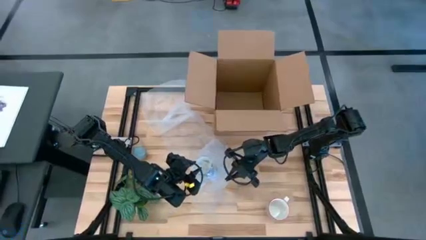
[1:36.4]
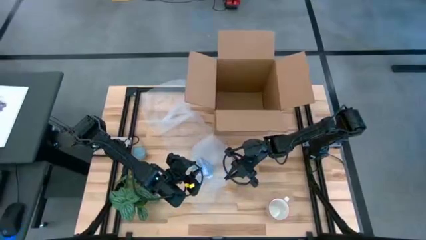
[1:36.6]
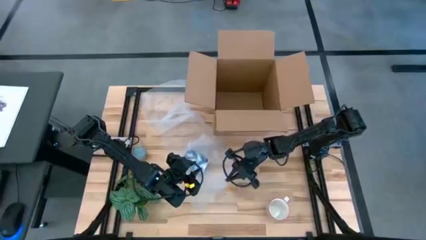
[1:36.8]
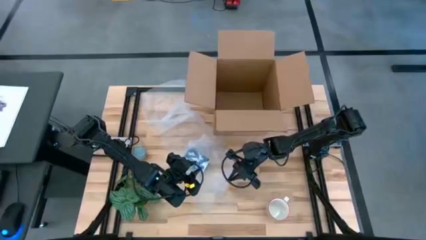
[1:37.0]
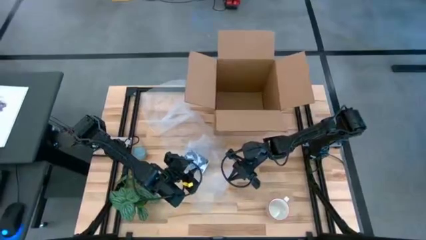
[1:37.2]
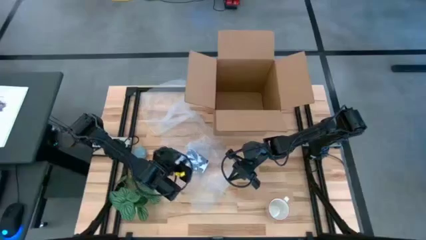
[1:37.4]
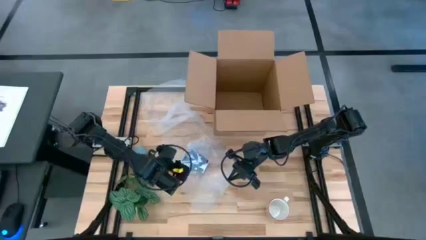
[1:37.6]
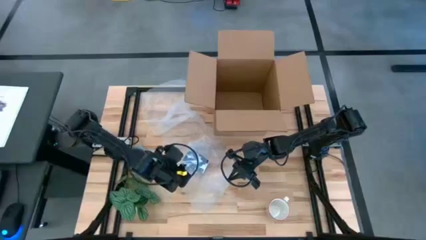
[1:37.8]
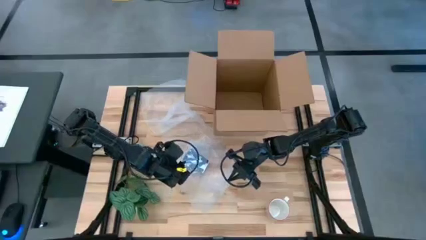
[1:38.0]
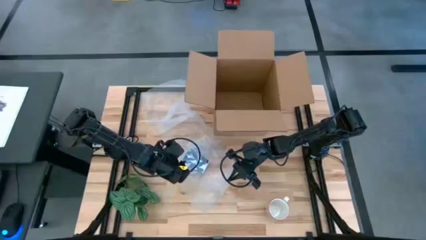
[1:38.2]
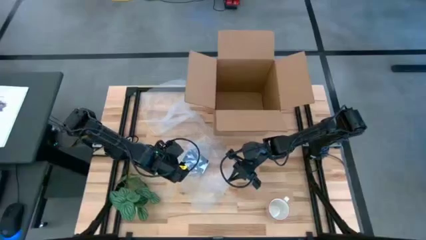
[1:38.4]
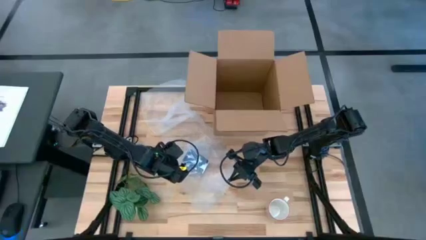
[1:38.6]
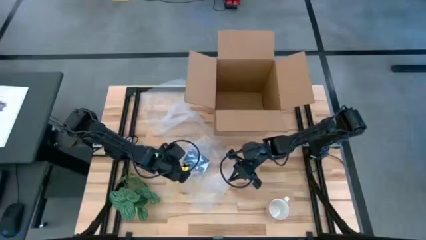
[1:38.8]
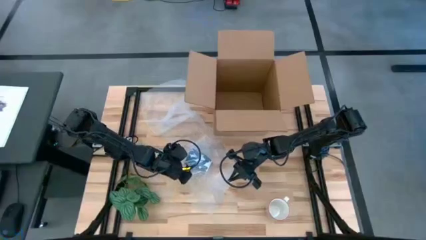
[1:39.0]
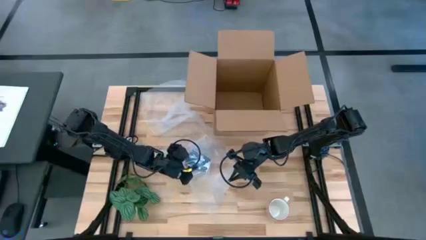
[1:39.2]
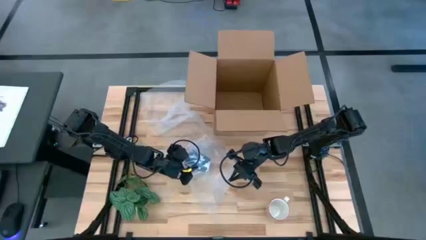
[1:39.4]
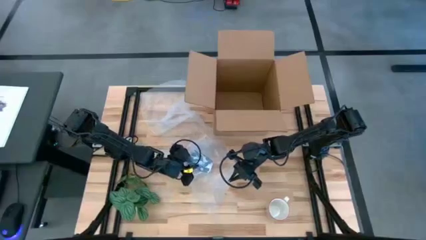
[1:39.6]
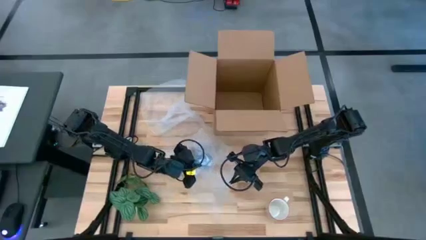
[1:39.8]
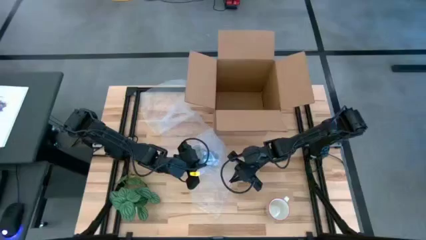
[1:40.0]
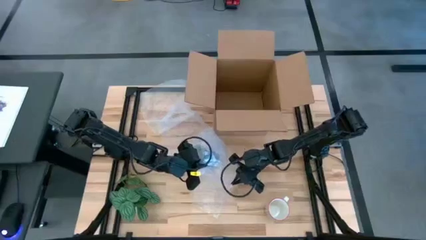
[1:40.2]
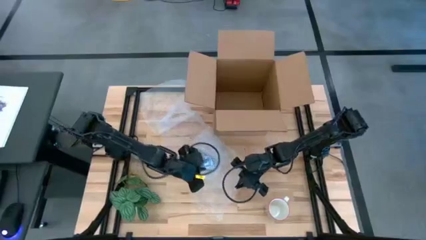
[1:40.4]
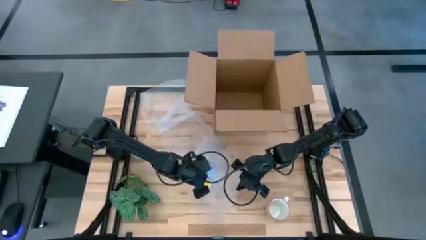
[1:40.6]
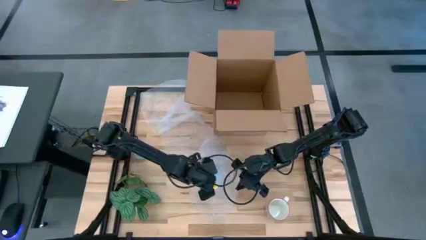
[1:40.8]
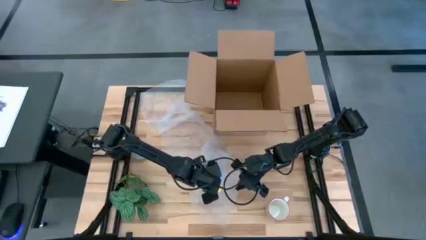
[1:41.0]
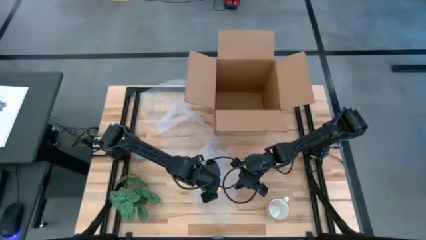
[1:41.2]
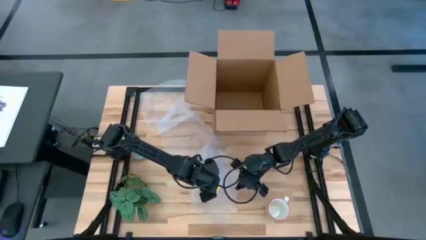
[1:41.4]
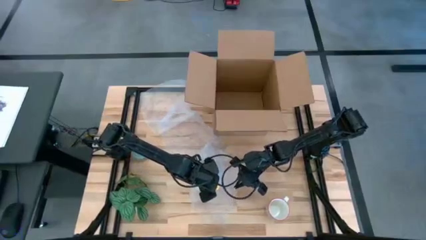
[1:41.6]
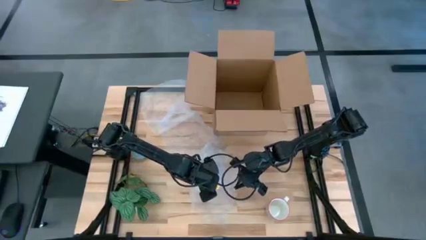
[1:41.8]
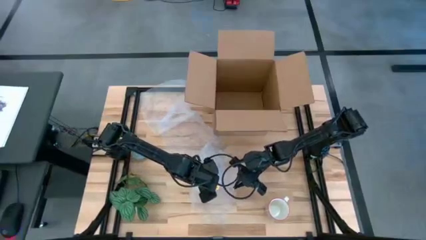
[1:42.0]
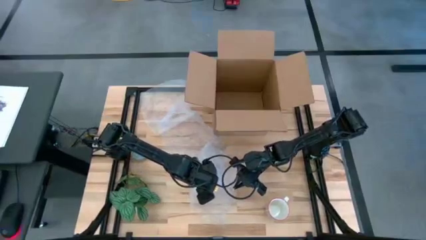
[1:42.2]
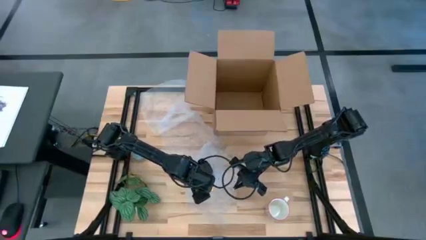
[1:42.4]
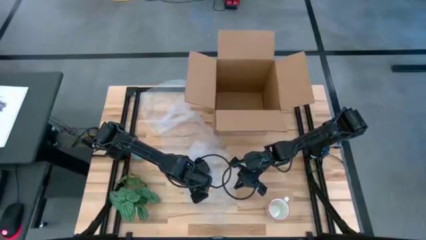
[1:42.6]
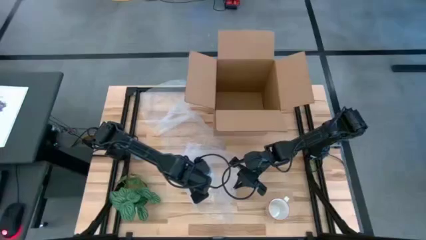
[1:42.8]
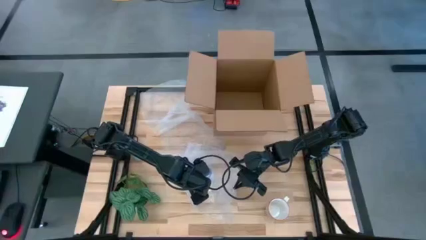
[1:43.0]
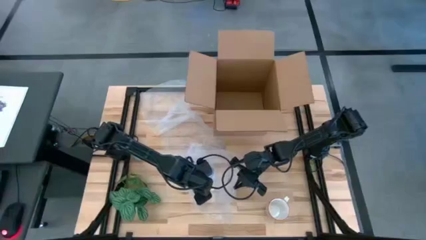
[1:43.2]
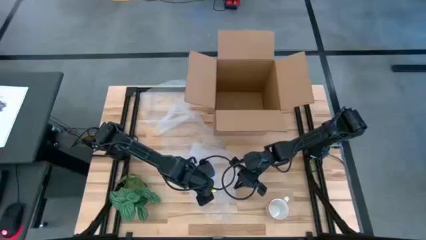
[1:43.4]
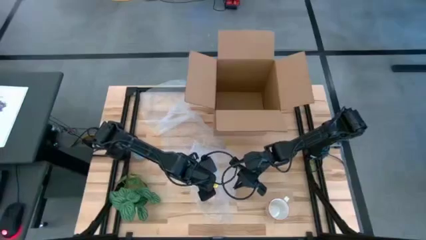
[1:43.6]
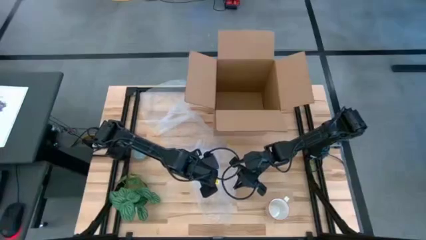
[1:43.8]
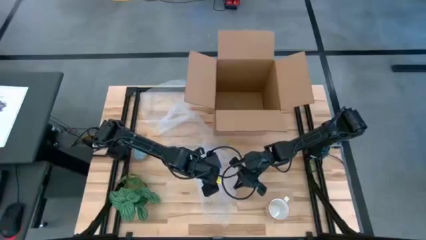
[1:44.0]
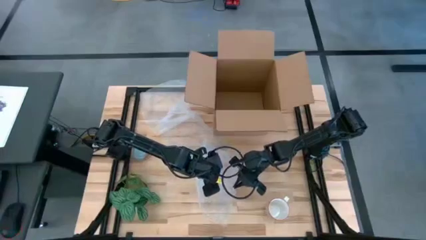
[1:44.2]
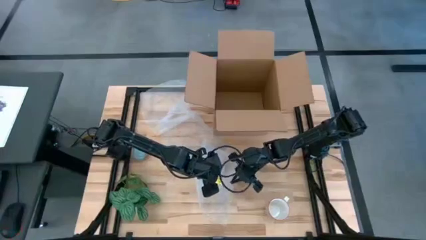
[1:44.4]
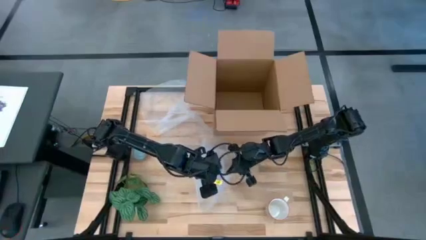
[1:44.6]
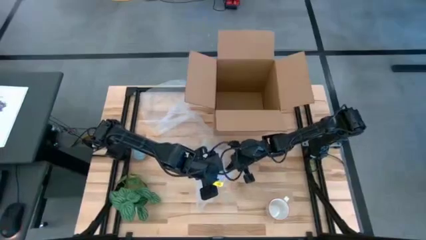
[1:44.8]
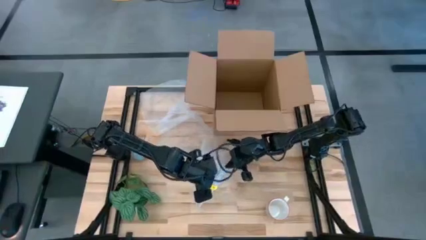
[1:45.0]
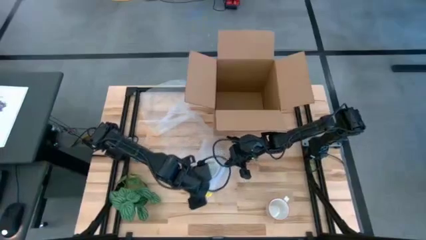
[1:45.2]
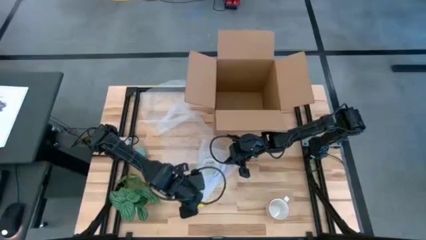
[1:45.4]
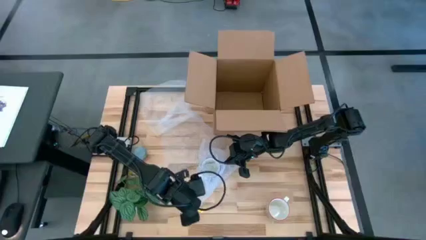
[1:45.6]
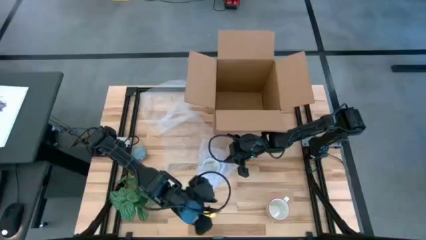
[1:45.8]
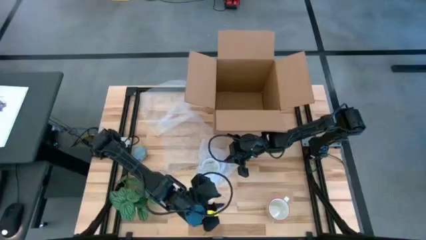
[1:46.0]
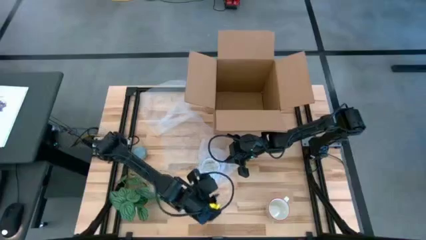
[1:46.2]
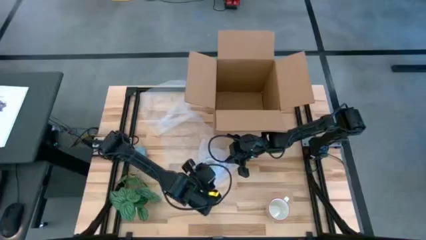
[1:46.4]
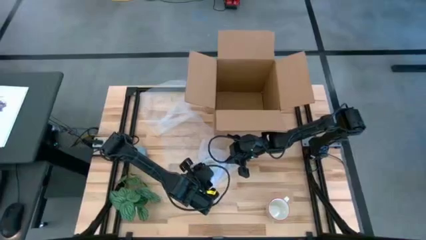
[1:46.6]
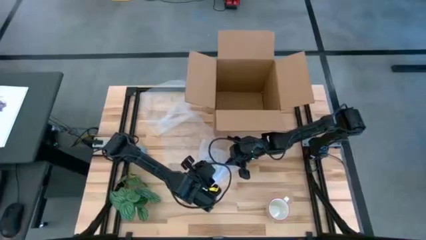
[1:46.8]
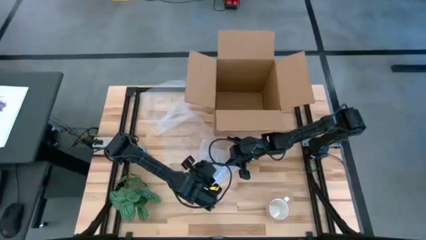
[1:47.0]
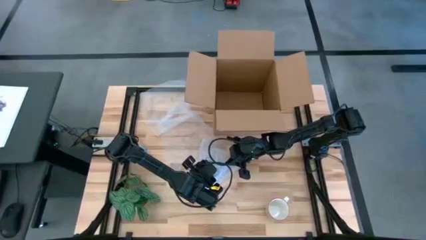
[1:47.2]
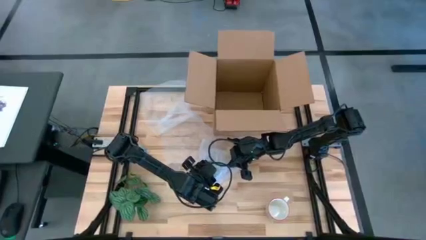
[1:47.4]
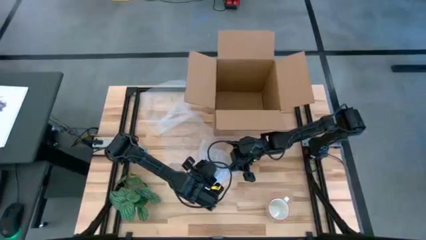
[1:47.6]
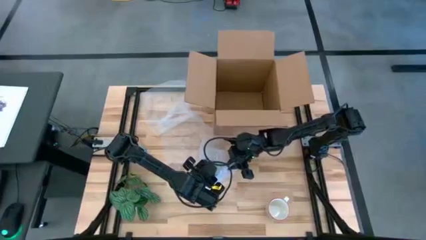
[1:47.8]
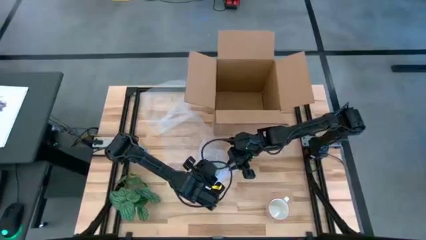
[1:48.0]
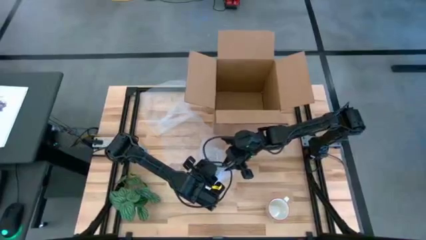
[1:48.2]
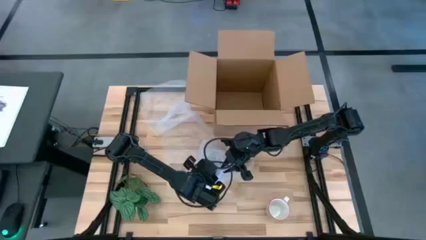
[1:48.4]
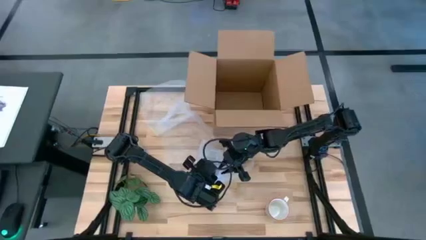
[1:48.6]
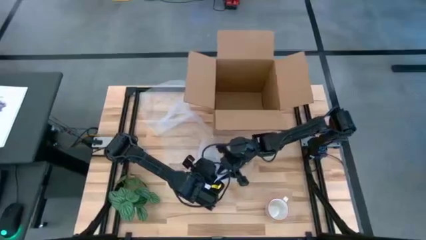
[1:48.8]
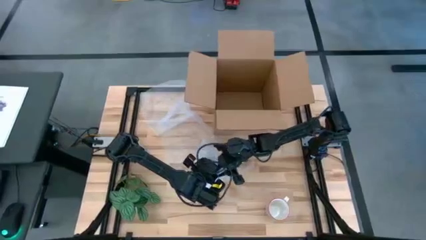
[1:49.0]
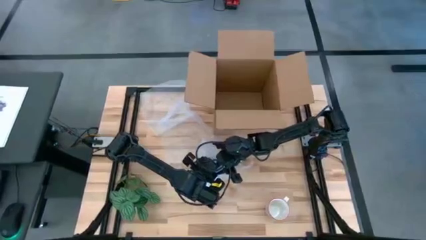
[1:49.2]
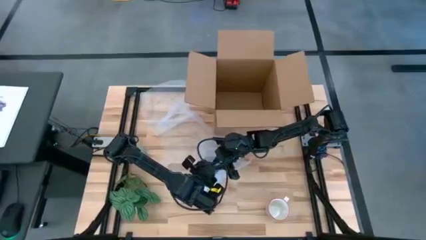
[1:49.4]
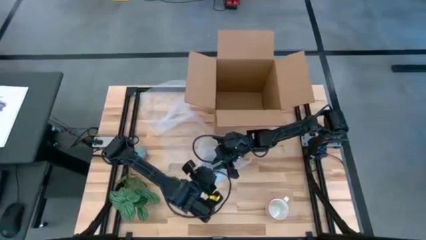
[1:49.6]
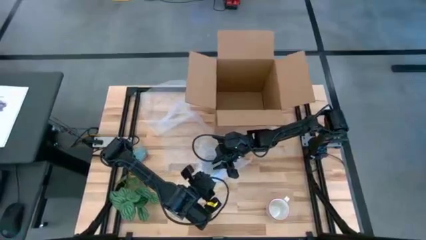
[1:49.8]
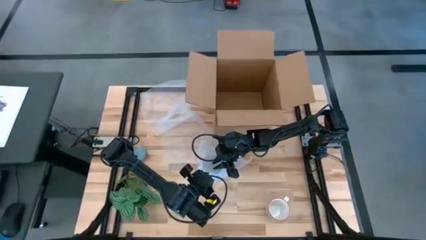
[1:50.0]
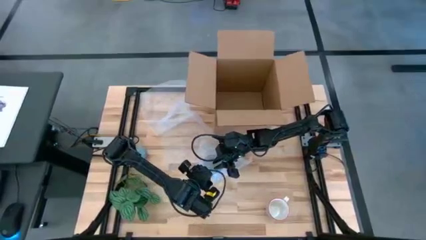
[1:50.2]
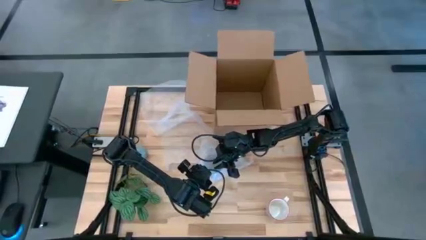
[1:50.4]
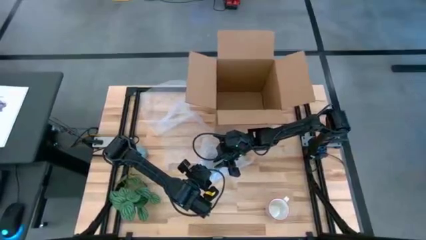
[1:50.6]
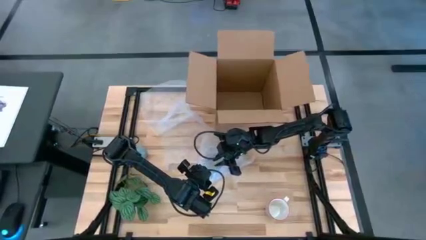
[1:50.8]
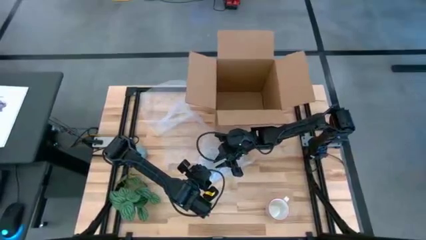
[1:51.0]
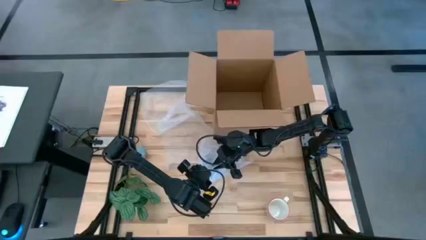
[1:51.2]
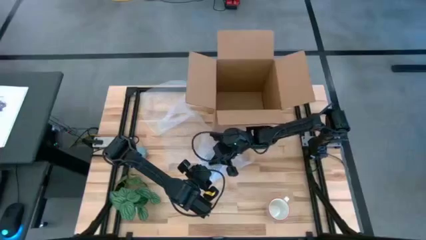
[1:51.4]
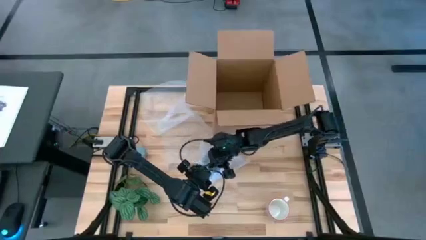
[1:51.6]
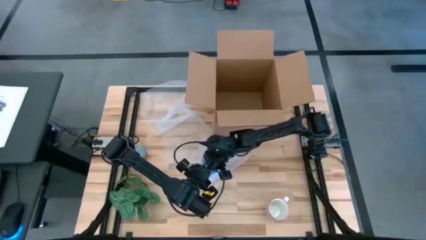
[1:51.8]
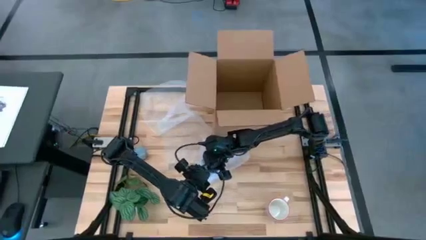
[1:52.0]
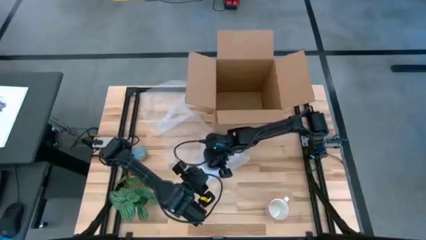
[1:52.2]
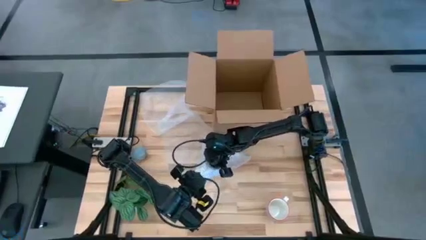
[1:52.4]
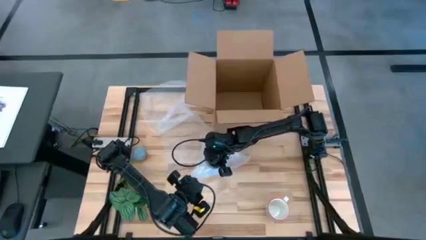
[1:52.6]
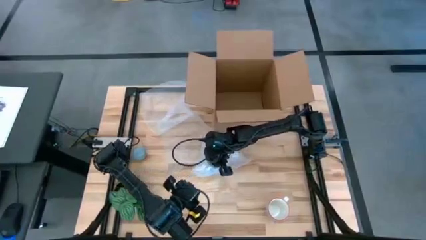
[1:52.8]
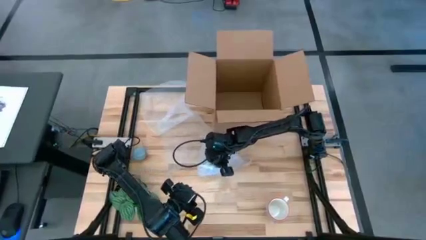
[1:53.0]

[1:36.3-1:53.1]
Task: wrap mug
Wrap the white blue mug with bubble wrap
